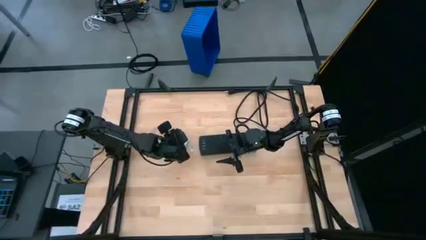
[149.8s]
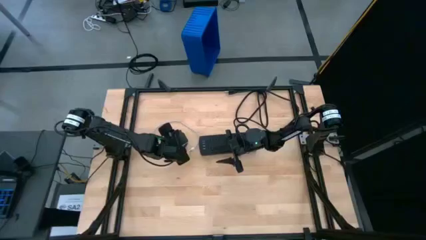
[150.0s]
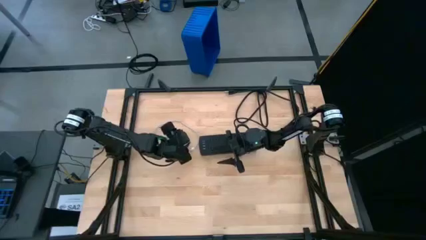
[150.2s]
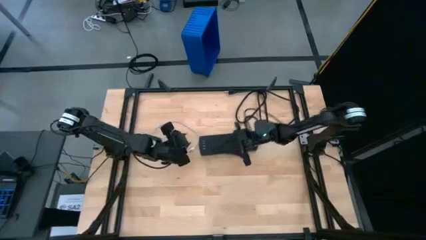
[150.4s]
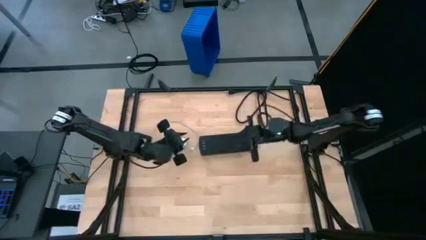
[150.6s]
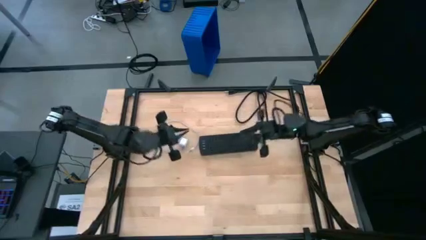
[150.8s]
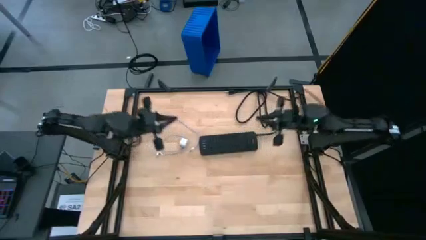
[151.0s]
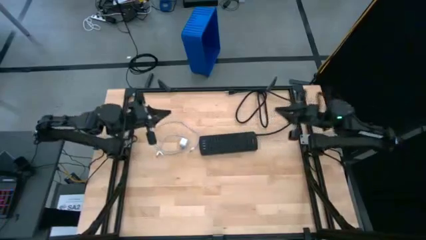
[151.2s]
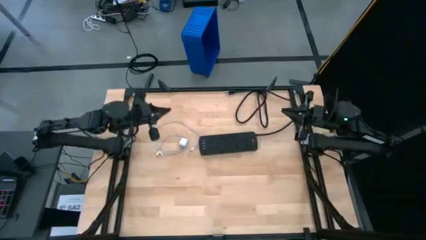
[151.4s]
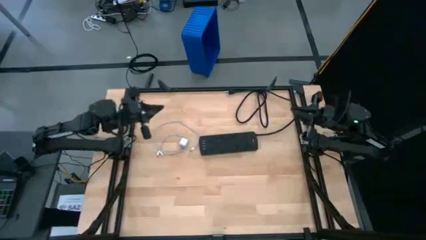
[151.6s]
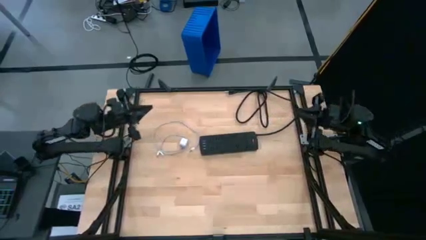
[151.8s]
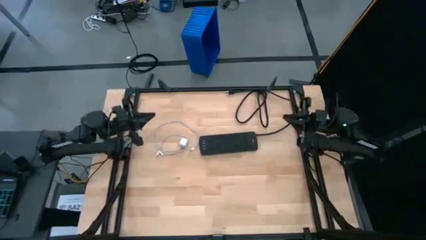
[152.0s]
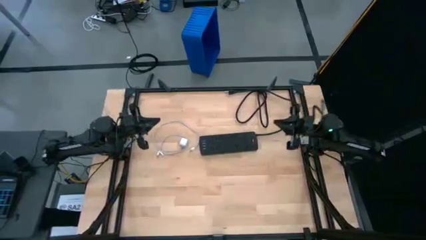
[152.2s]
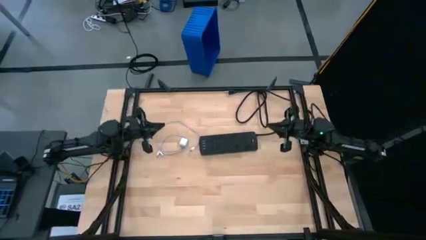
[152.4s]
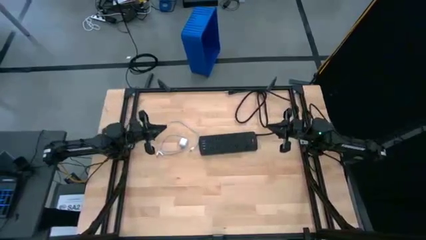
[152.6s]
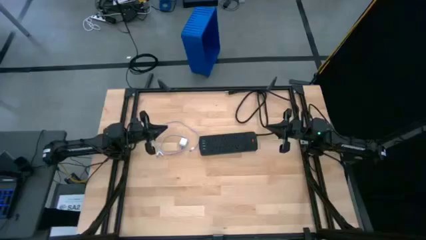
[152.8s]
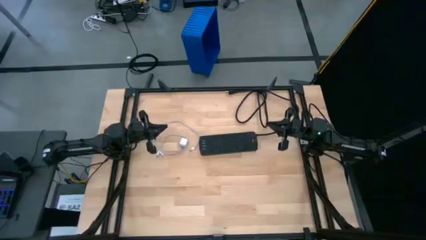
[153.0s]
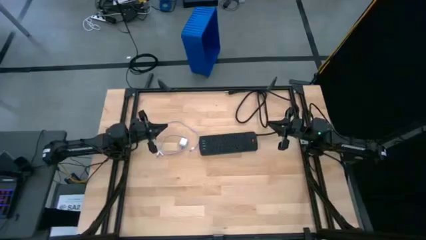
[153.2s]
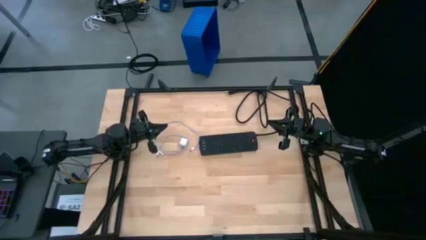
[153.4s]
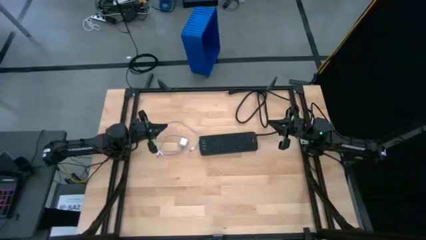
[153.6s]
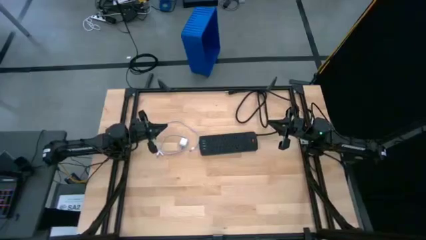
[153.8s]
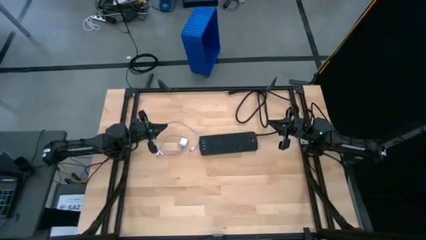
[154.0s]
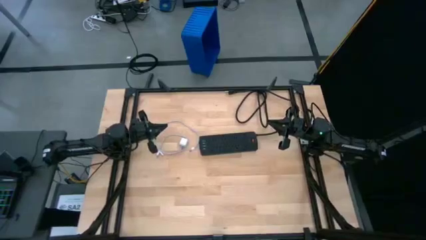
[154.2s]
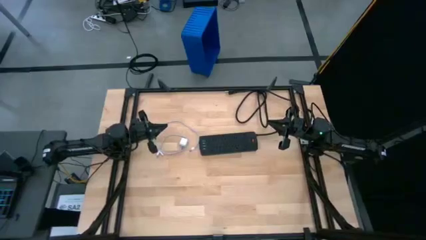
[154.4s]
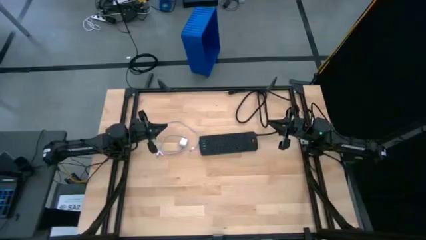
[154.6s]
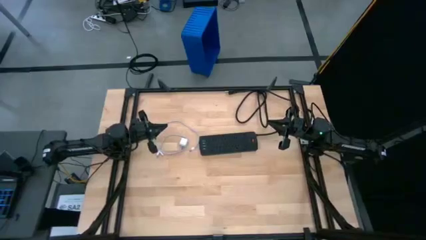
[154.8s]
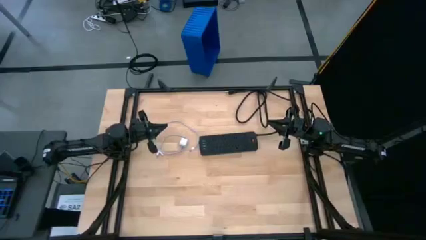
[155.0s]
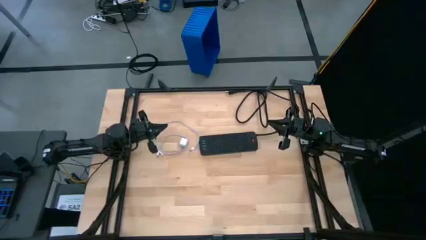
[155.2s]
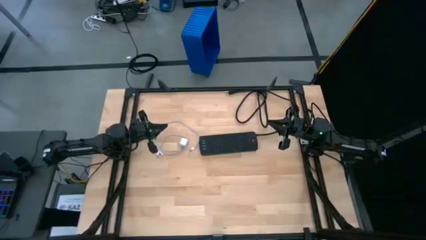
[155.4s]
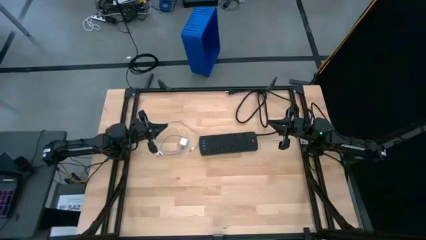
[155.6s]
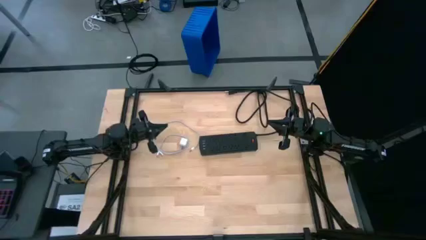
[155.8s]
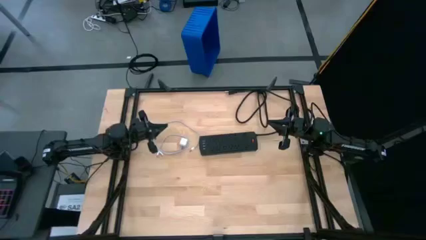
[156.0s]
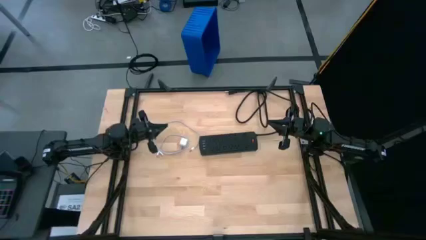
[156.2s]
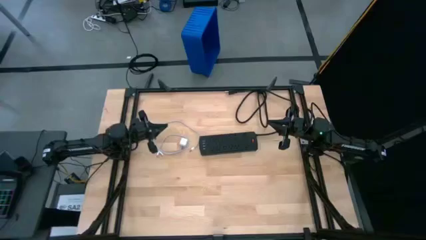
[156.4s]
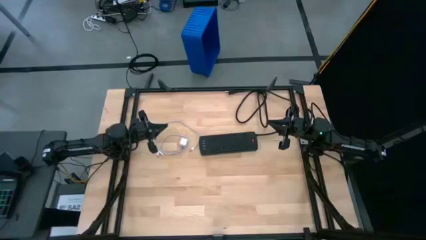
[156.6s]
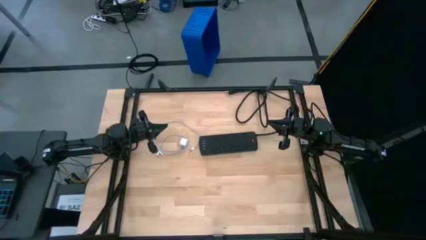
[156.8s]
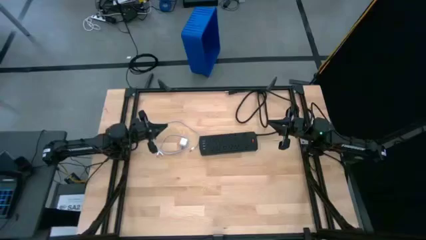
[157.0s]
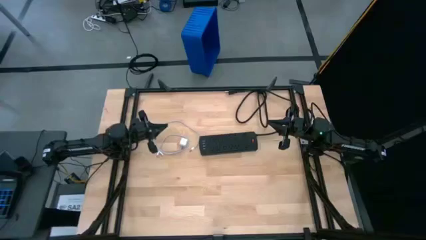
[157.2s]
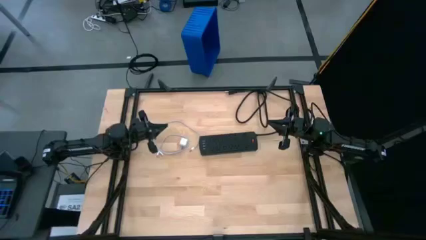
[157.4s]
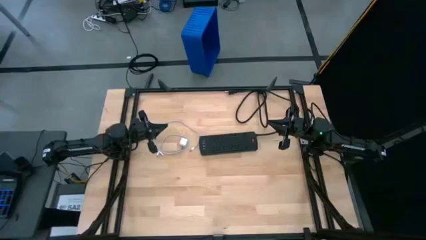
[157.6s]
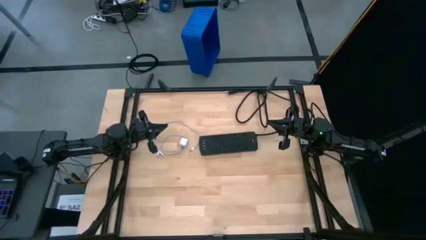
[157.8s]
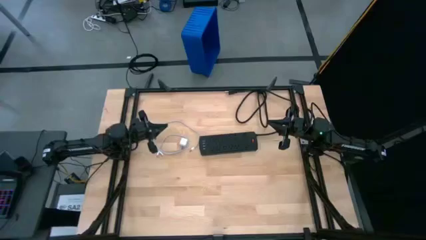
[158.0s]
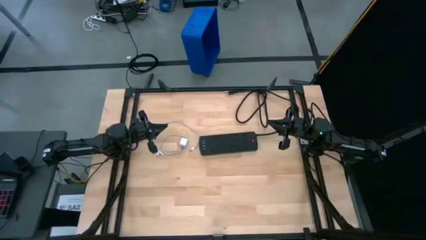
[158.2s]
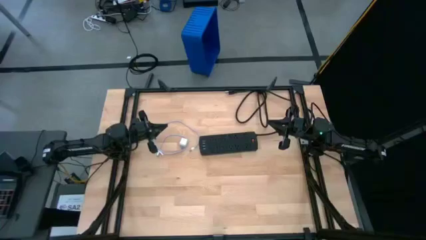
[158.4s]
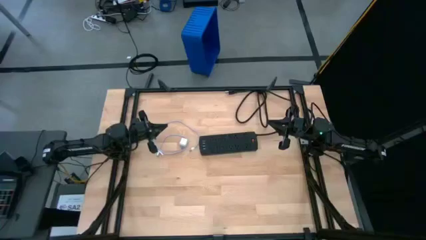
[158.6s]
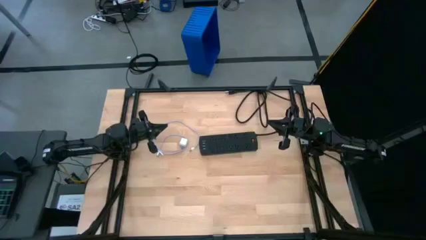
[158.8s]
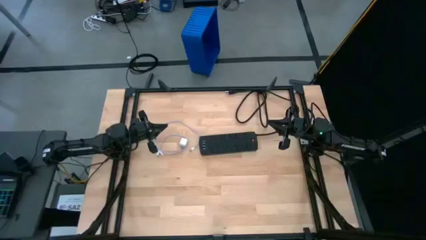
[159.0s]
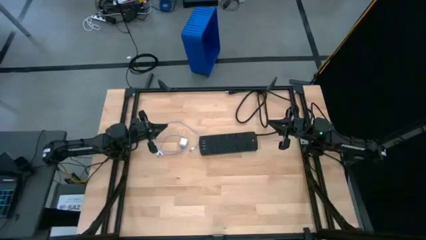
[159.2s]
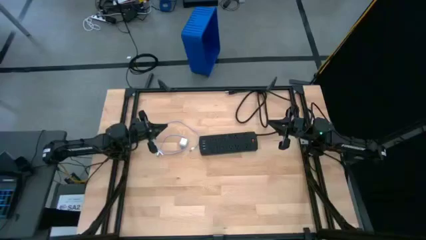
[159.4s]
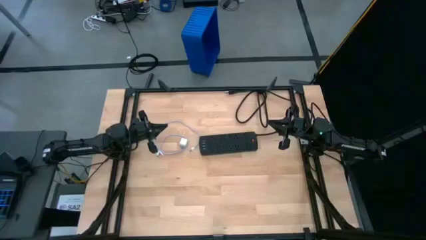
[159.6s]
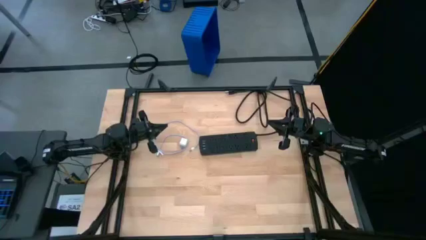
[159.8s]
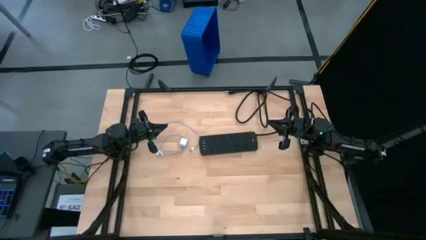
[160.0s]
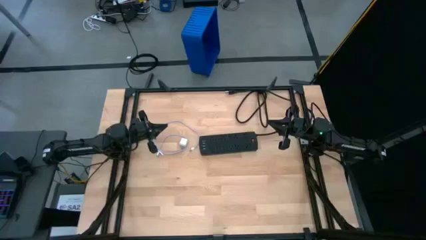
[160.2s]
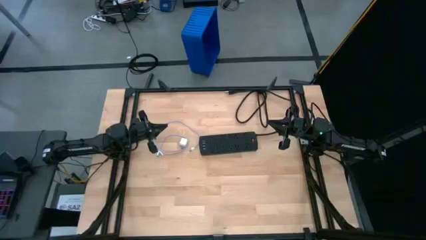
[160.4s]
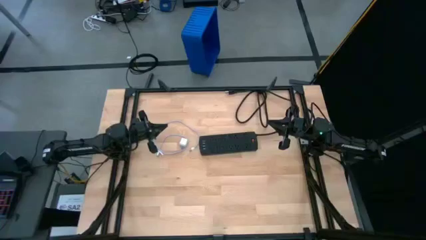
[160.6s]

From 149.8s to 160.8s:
Task: Insert USB
Return to Home Position

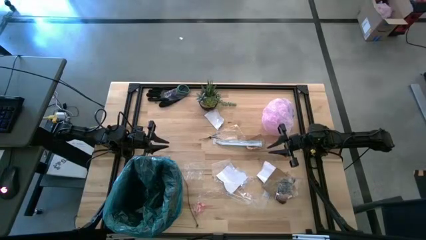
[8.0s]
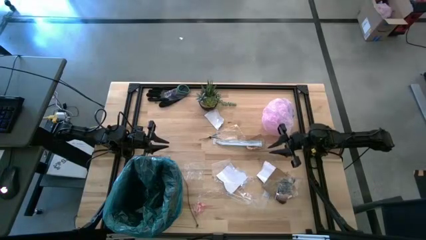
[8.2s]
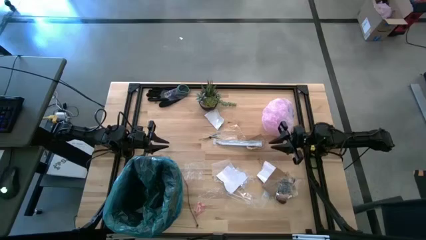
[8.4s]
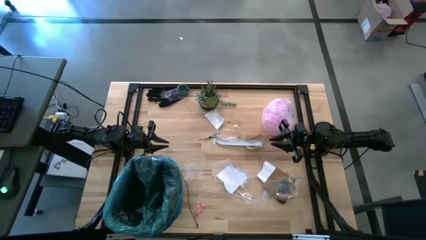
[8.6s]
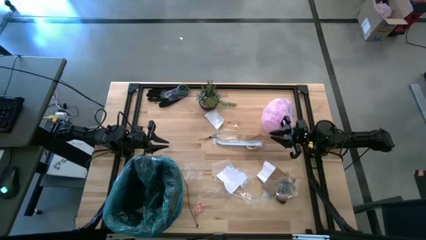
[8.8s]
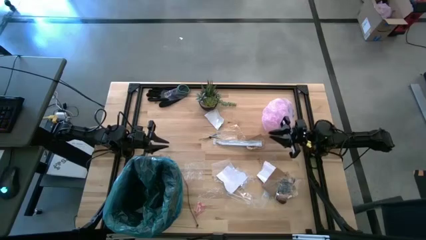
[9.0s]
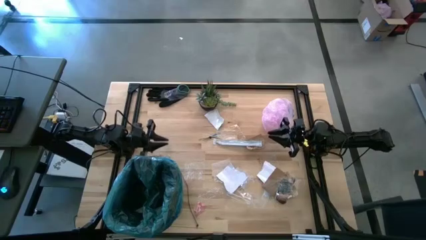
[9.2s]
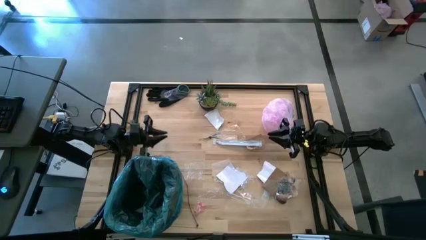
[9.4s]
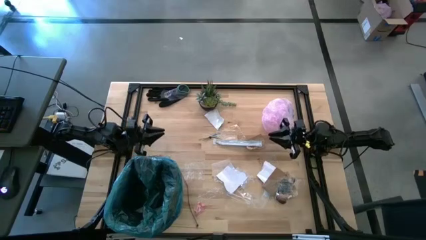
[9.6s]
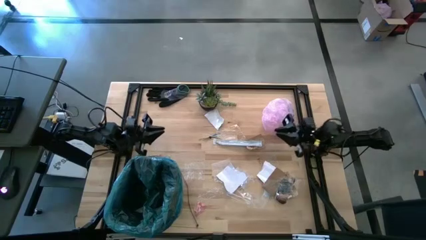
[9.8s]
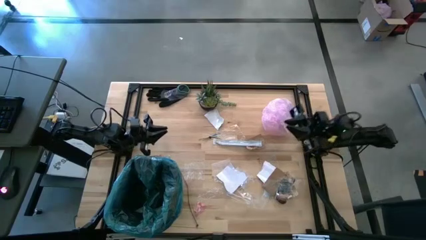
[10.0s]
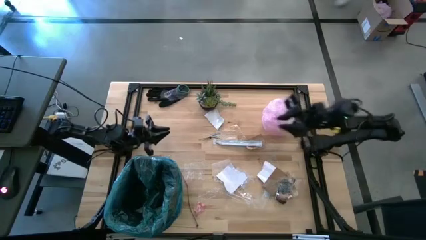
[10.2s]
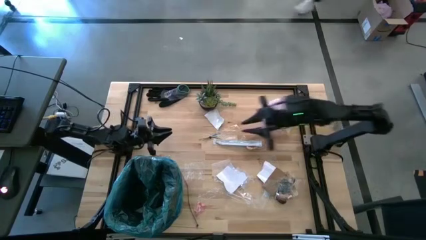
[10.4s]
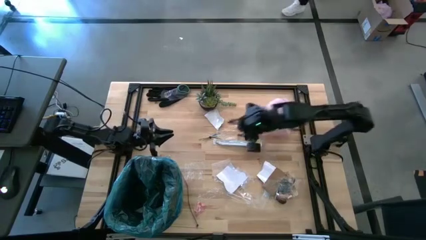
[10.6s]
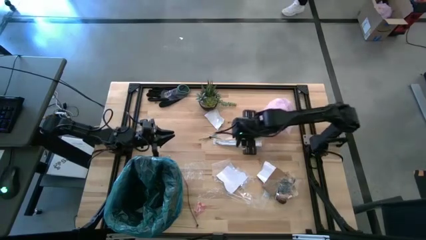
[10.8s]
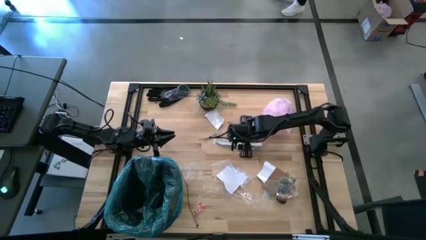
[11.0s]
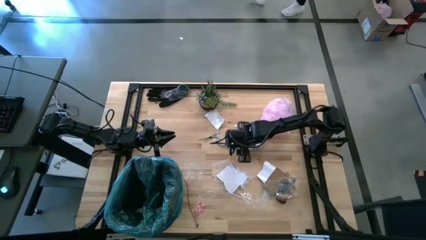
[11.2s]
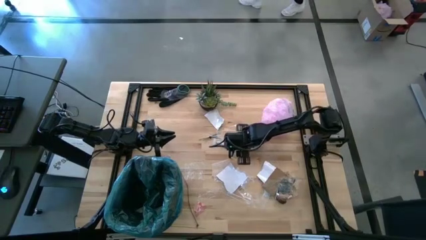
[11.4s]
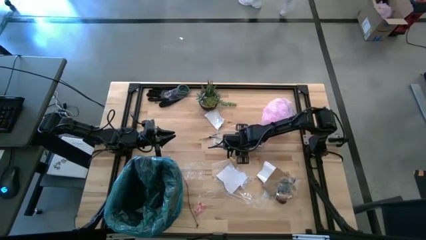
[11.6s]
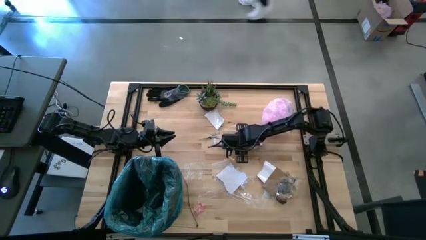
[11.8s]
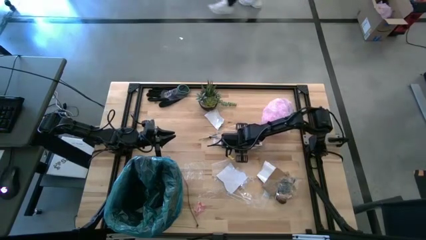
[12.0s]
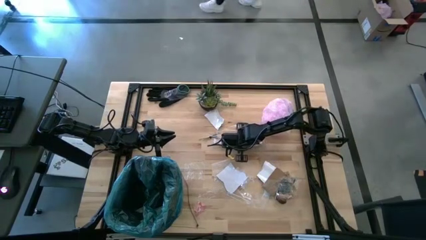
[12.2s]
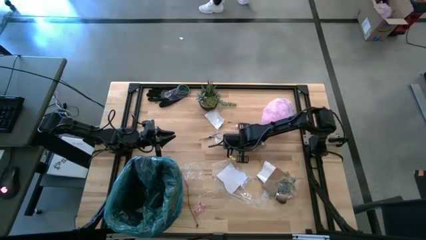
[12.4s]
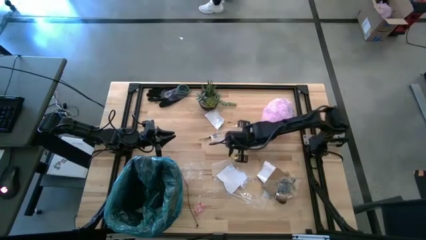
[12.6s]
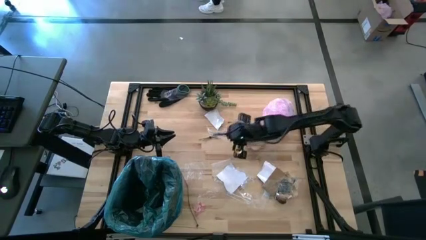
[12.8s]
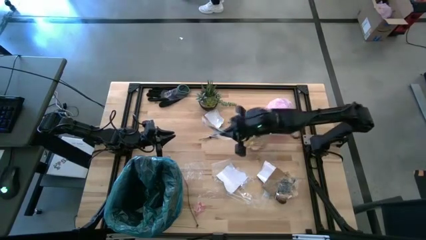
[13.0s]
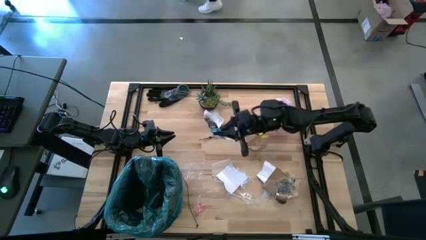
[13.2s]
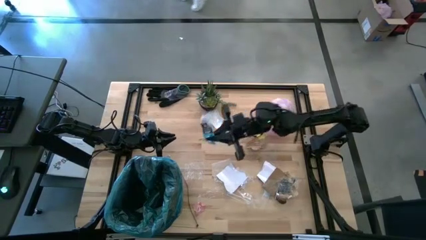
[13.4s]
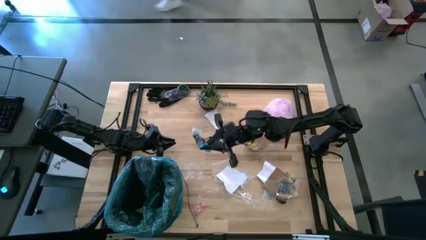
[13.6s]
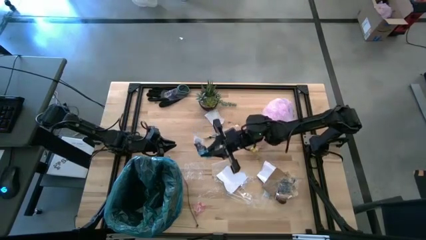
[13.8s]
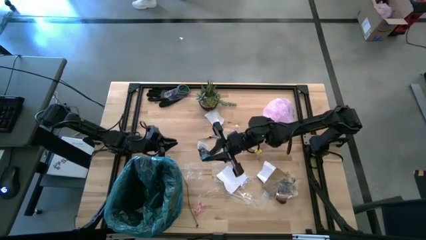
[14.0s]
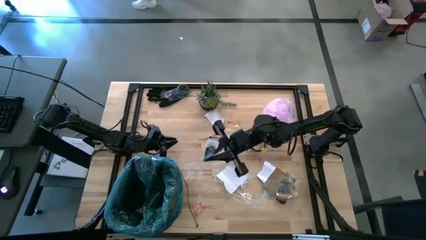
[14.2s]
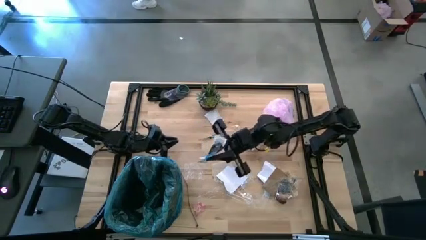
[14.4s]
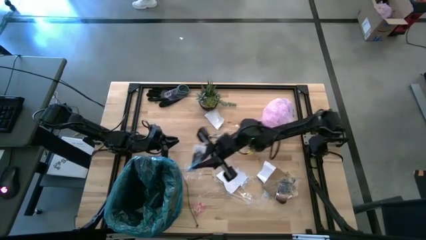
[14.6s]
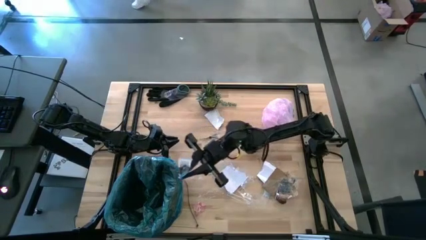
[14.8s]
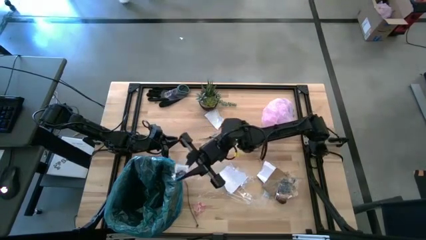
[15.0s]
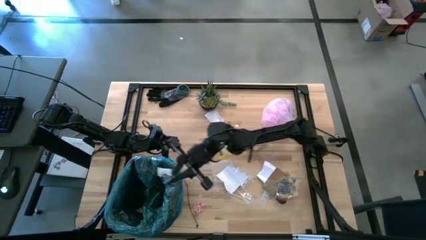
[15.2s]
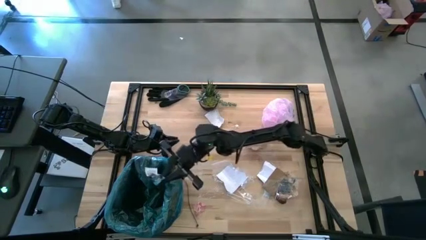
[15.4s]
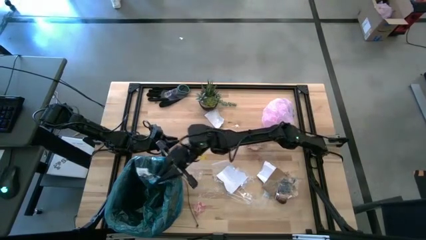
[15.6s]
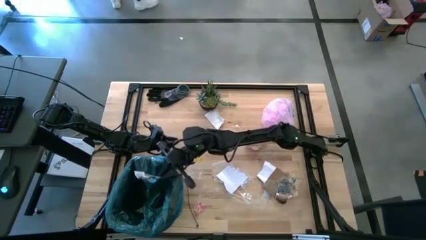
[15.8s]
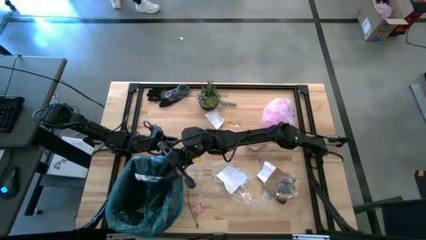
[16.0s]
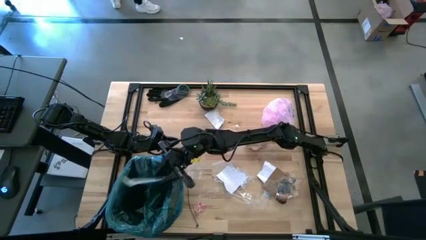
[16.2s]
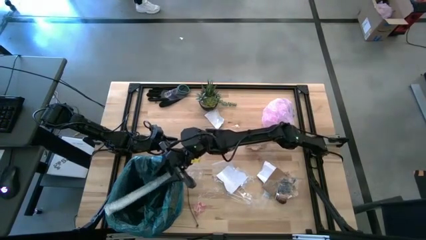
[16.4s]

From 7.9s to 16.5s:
Task: place trash/remove bag and relplace
Put the white plastic into the trash bin
